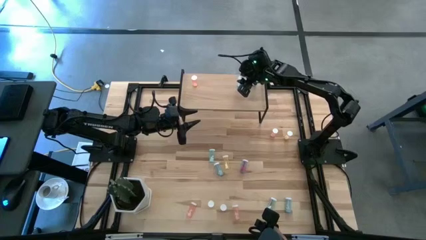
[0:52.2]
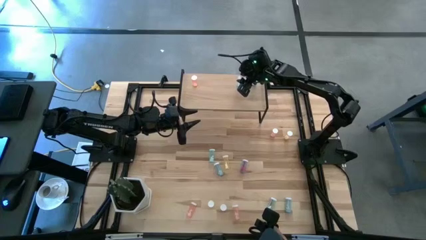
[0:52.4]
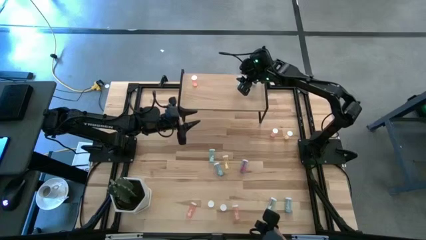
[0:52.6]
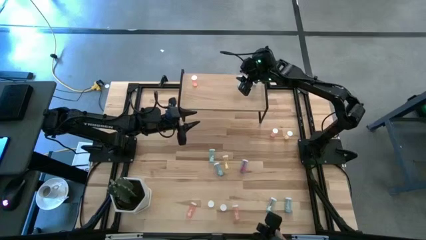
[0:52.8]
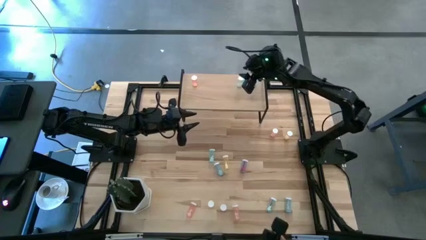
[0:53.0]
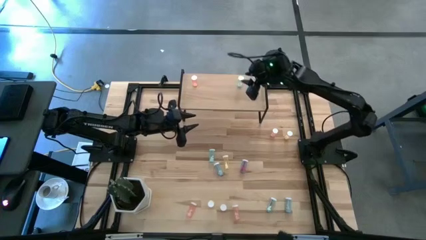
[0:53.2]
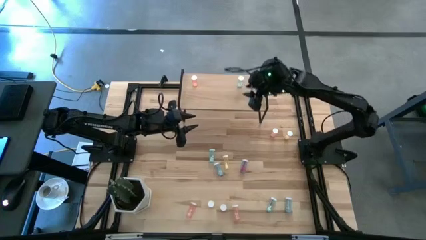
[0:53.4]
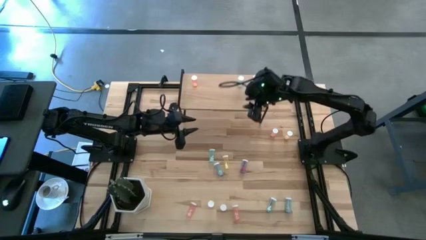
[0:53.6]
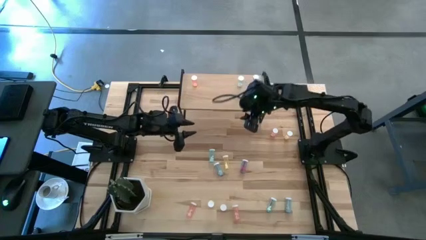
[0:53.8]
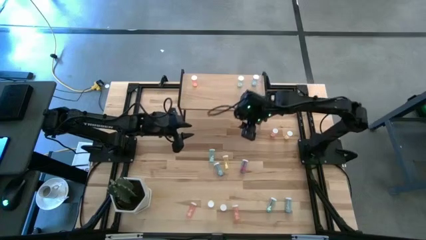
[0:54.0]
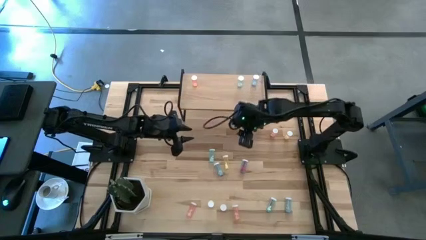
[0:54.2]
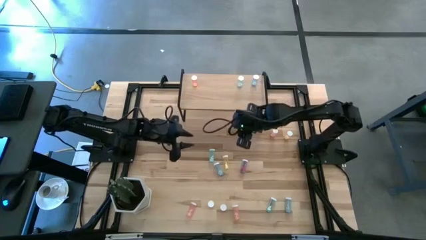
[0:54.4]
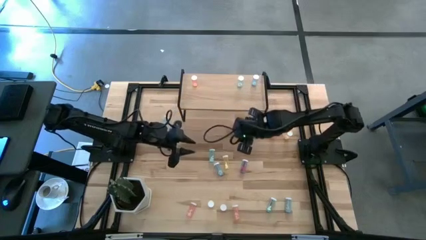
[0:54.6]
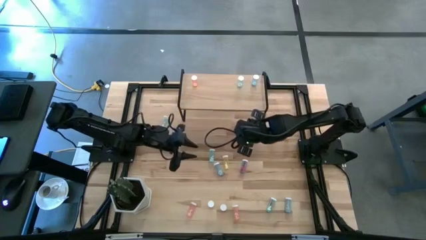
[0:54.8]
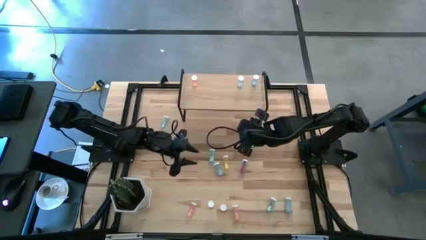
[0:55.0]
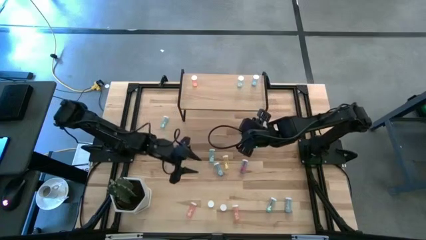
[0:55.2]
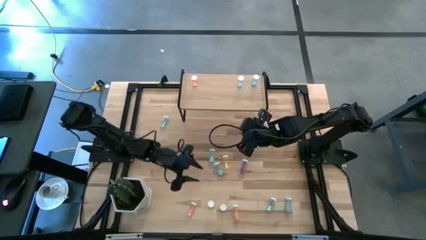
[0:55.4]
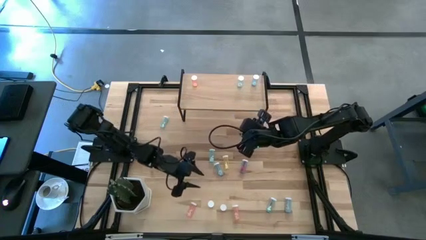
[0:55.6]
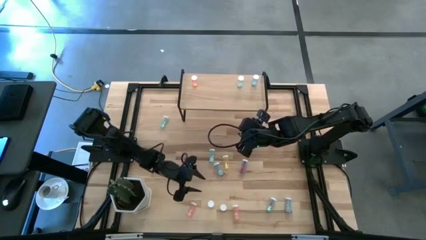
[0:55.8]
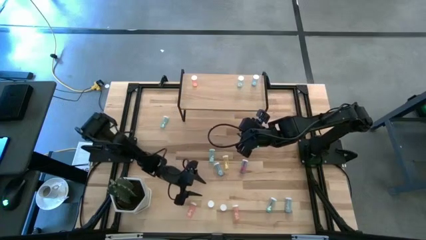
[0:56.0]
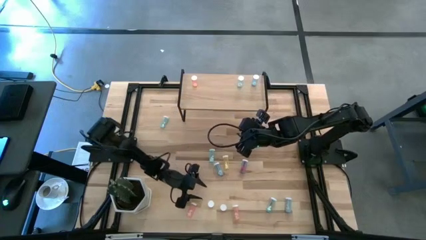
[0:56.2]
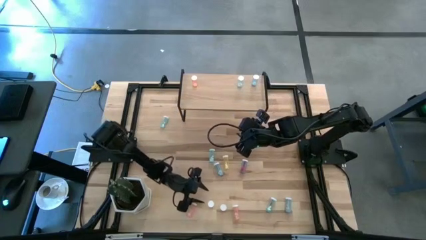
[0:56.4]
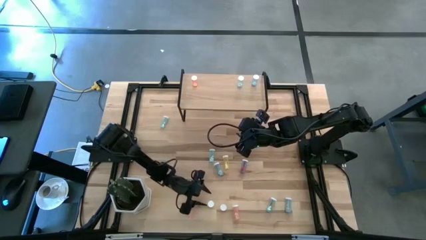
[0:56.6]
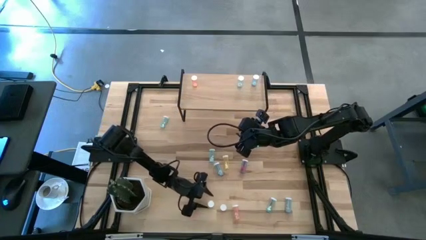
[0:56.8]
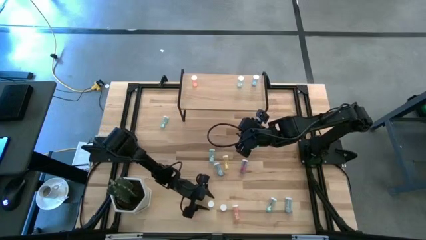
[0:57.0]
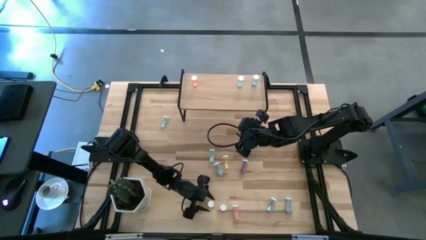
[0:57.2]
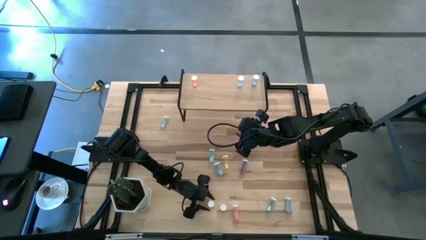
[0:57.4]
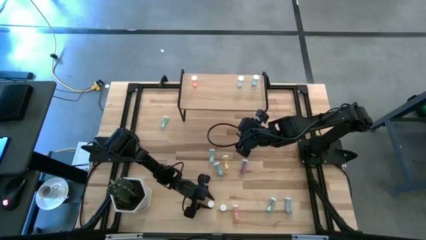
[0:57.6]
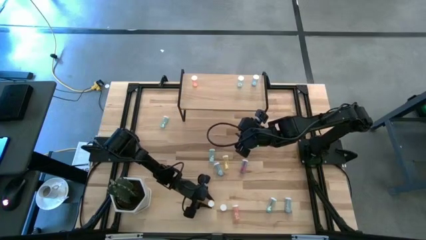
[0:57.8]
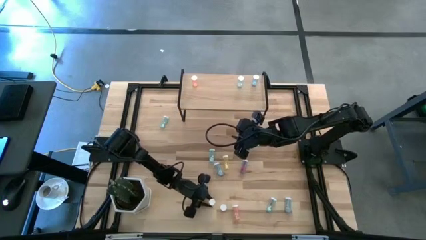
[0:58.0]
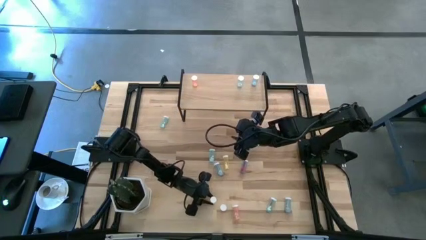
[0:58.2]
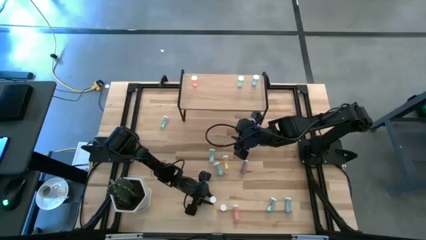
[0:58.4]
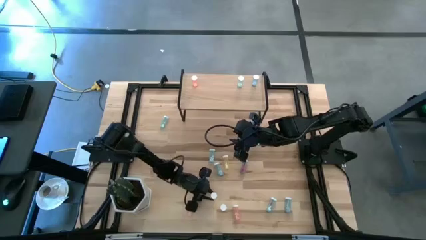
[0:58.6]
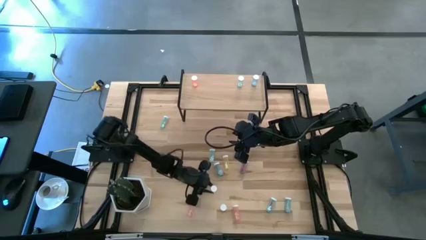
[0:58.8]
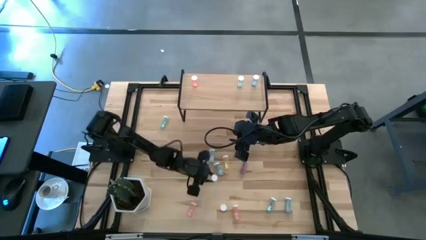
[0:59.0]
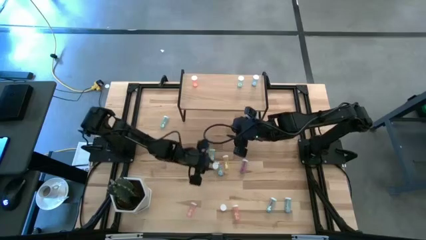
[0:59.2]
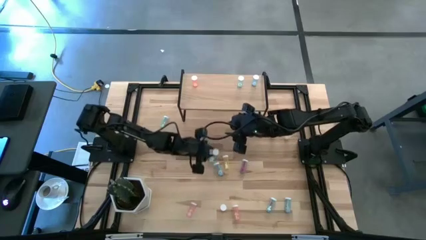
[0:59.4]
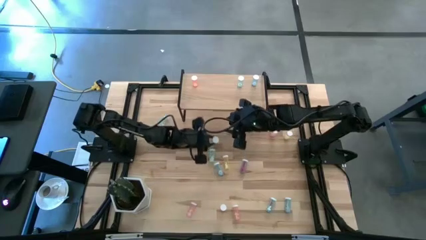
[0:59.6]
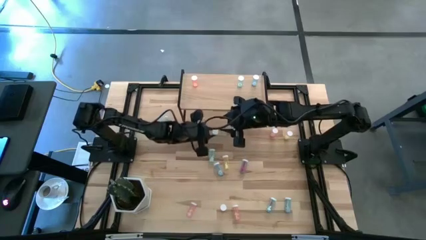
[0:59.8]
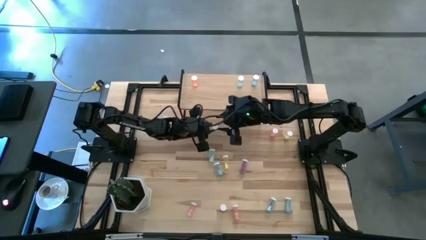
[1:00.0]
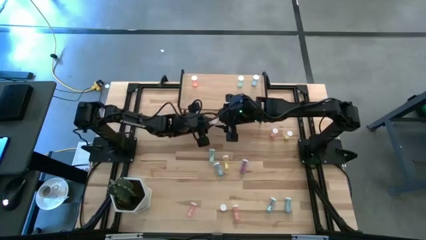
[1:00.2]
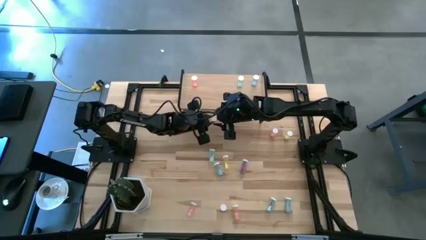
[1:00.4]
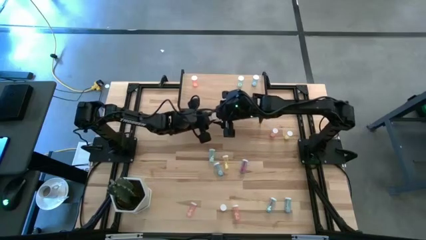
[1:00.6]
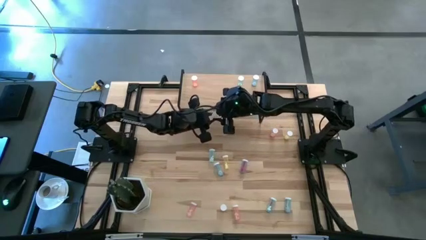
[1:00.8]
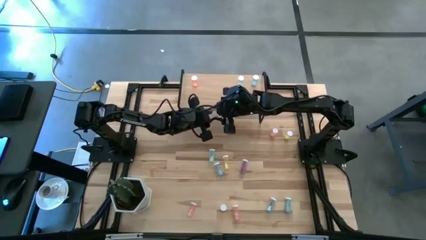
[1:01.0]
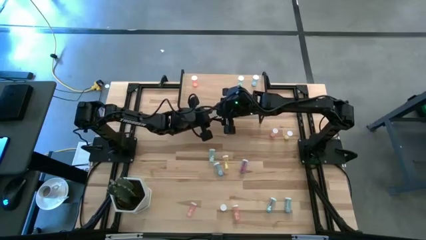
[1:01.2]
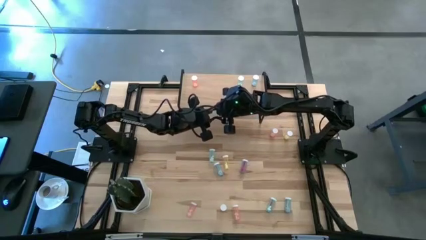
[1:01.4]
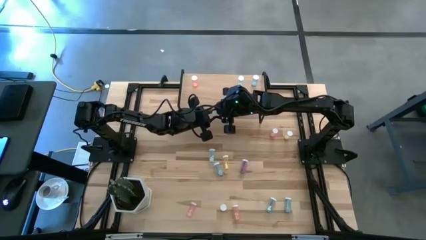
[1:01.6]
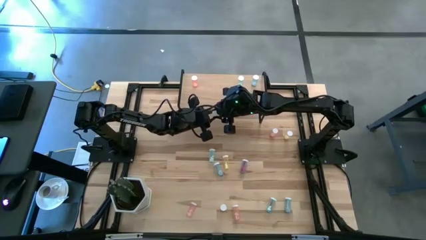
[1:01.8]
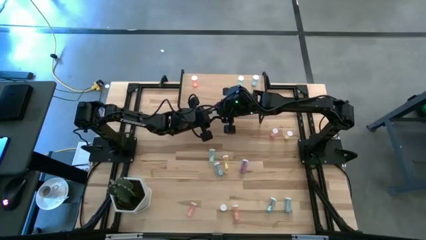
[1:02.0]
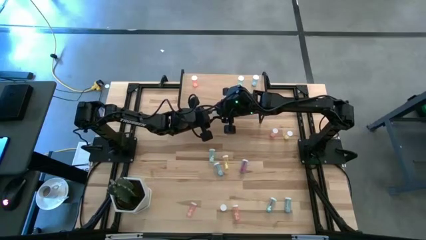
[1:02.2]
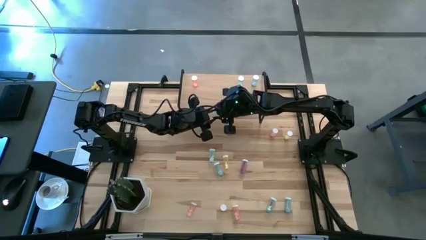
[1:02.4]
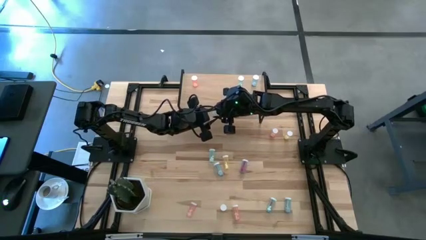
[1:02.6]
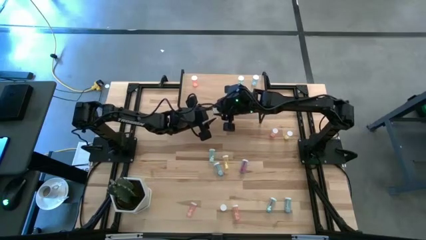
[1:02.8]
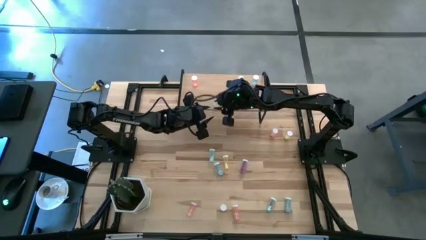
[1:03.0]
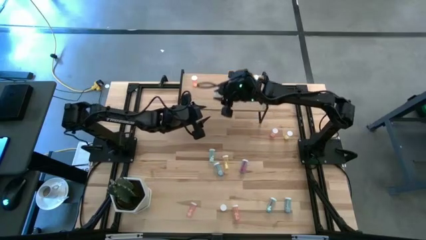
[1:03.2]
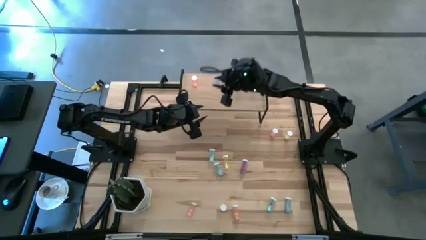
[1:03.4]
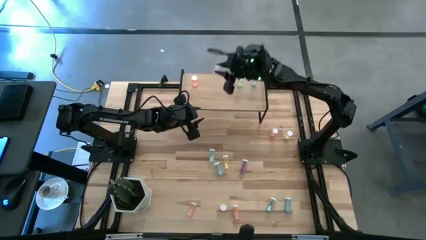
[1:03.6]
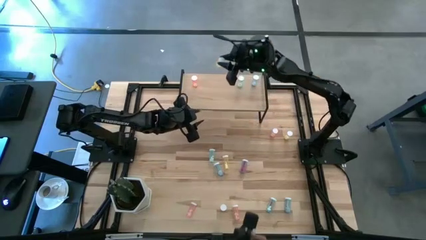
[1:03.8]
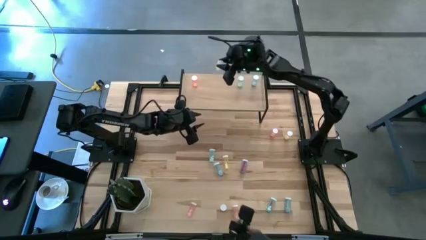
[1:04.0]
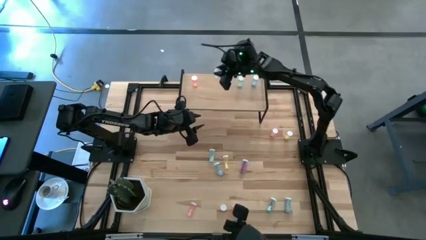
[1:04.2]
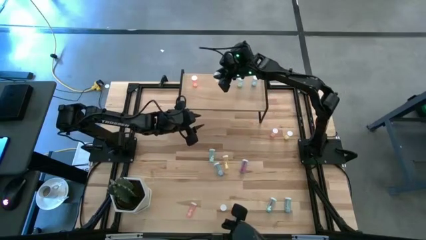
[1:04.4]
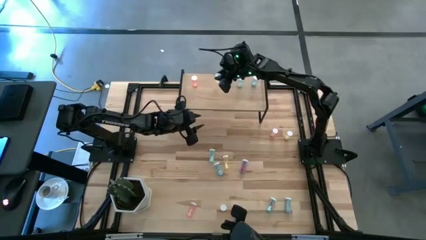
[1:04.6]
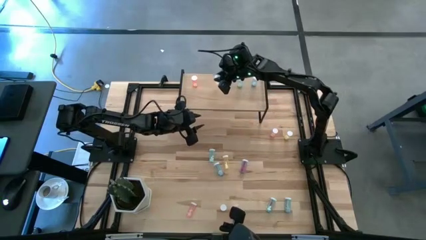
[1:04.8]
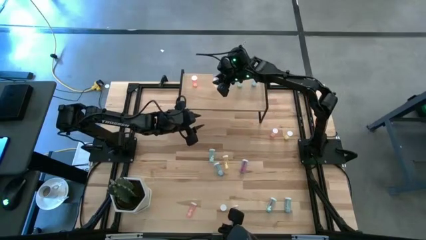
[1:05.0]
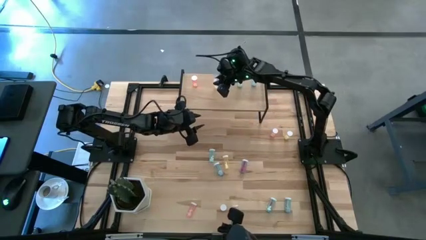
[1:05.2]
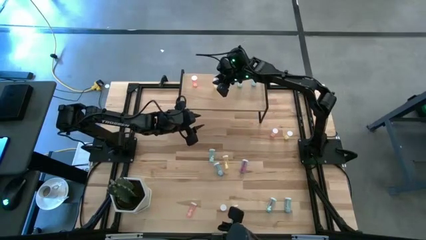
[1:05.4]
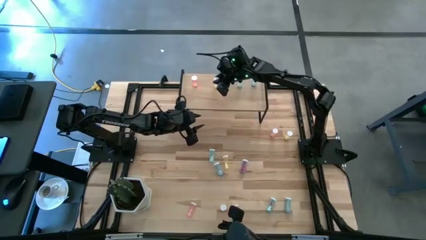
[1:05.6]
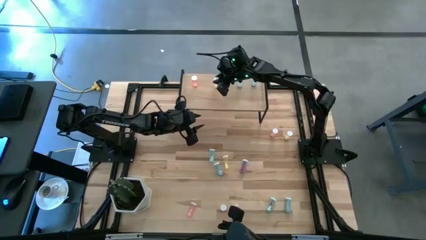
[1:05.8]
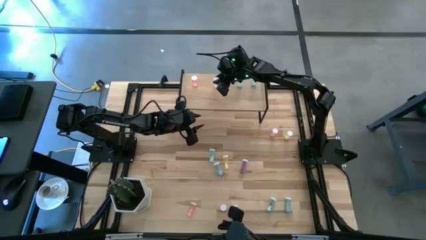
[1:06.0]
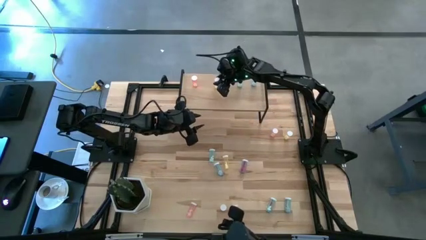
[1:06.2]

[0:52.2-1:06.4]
Task: Pick and place medicine bottles onto shelf by color
Put the yellow pill bottle on the shelf
